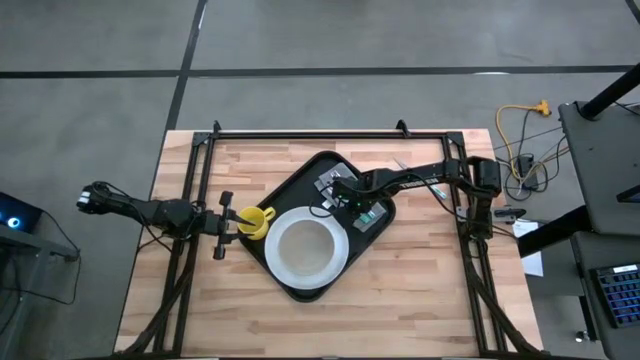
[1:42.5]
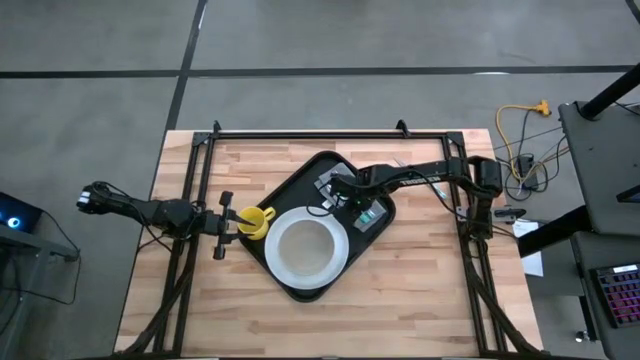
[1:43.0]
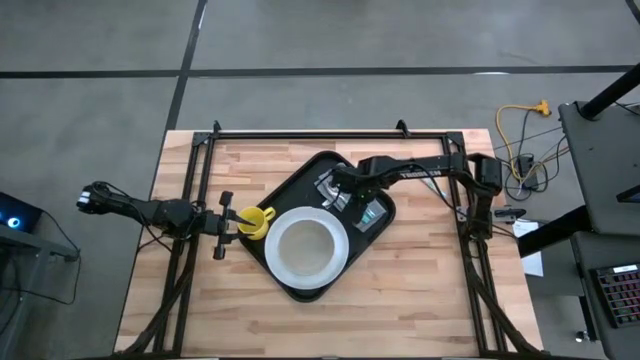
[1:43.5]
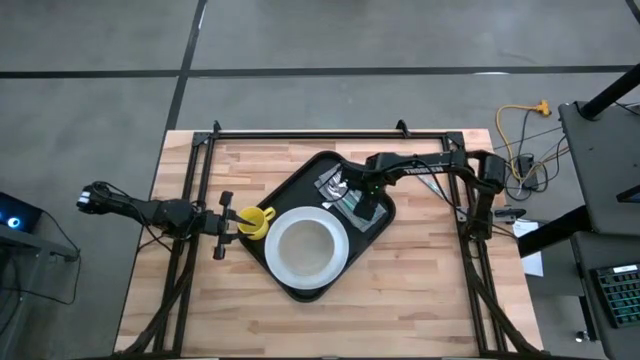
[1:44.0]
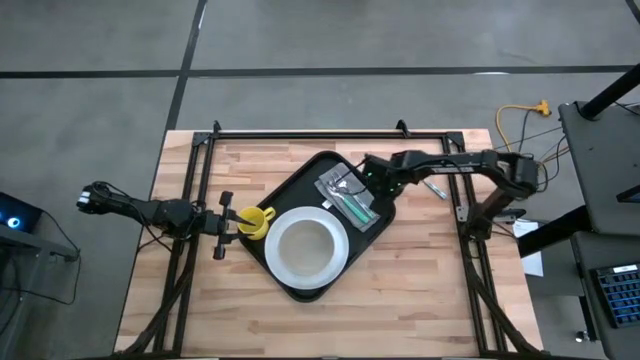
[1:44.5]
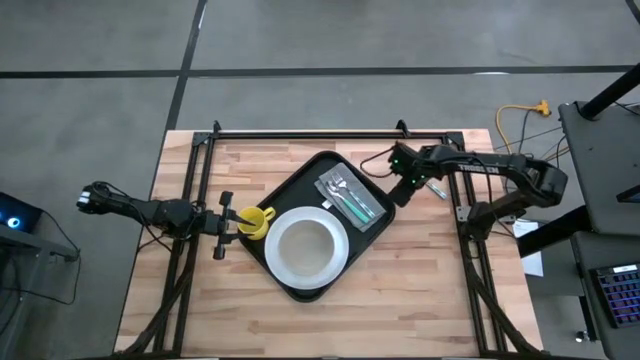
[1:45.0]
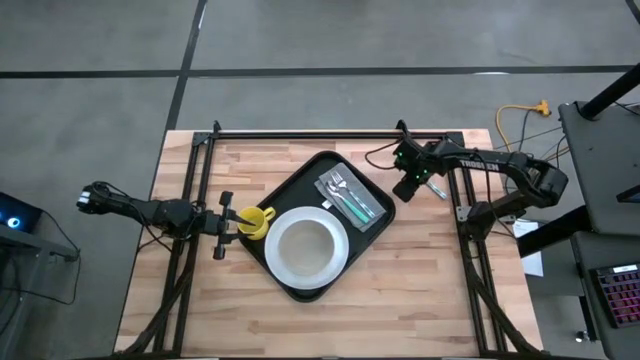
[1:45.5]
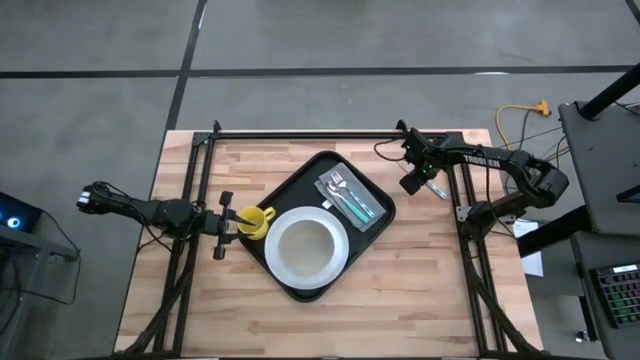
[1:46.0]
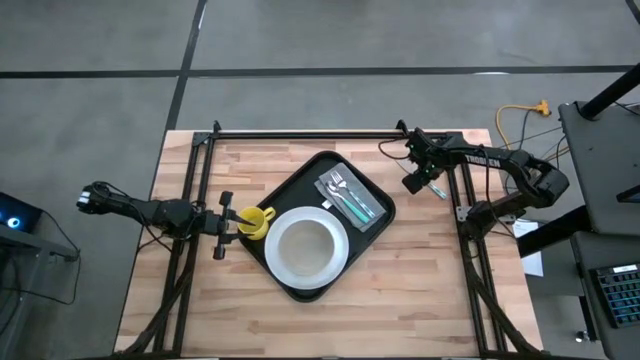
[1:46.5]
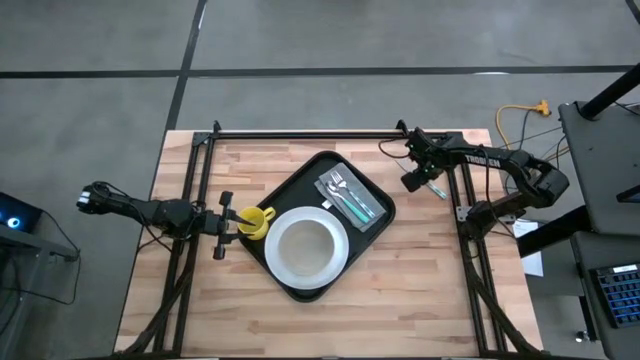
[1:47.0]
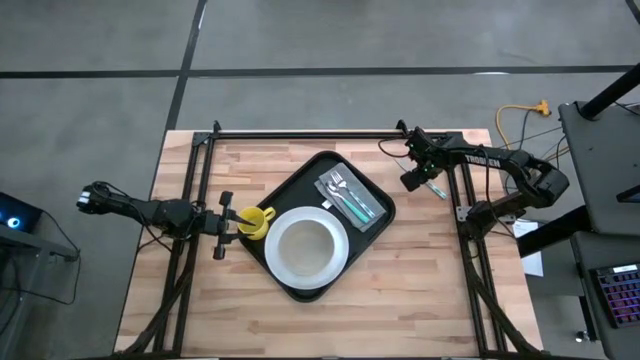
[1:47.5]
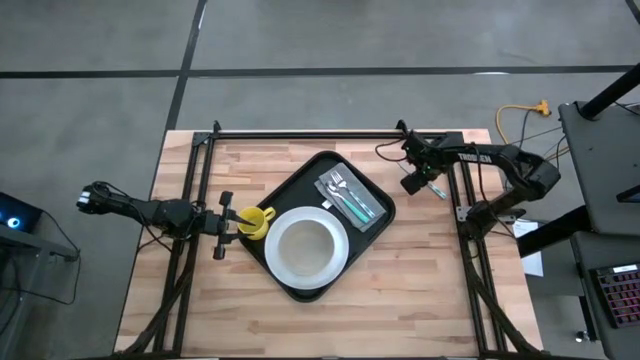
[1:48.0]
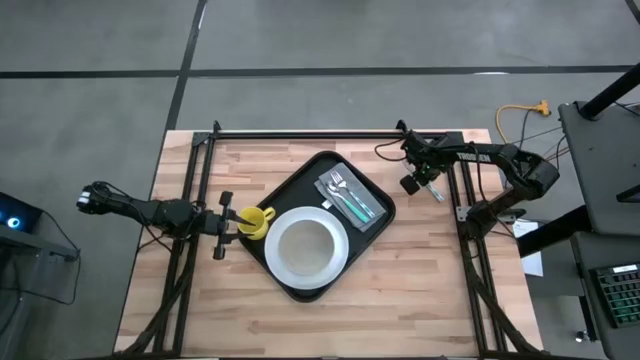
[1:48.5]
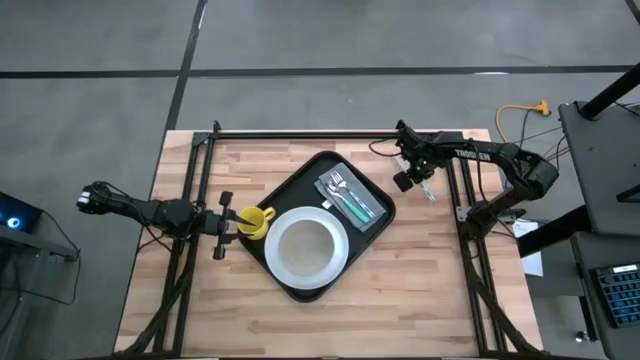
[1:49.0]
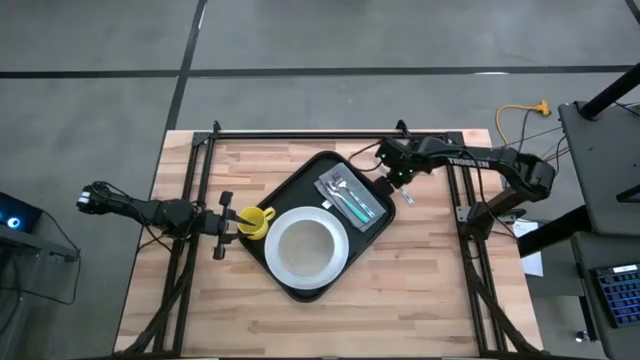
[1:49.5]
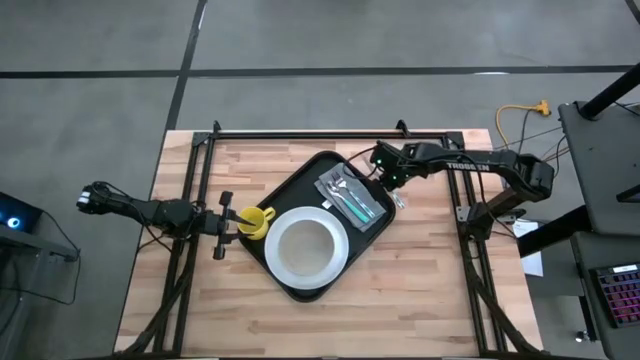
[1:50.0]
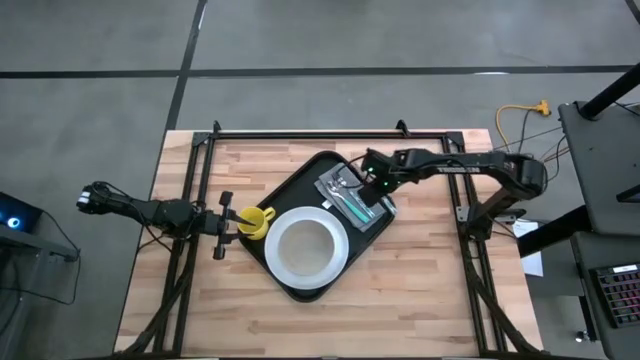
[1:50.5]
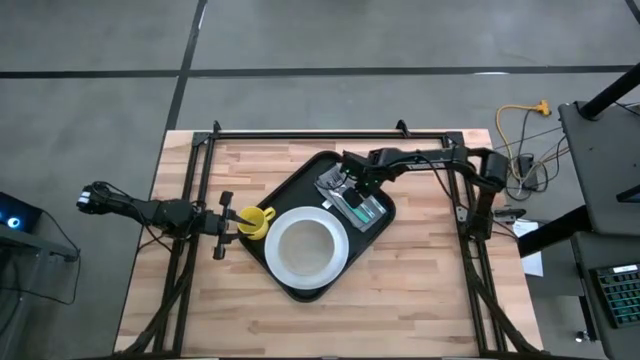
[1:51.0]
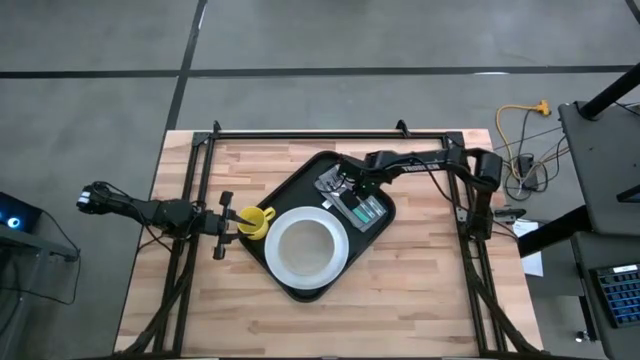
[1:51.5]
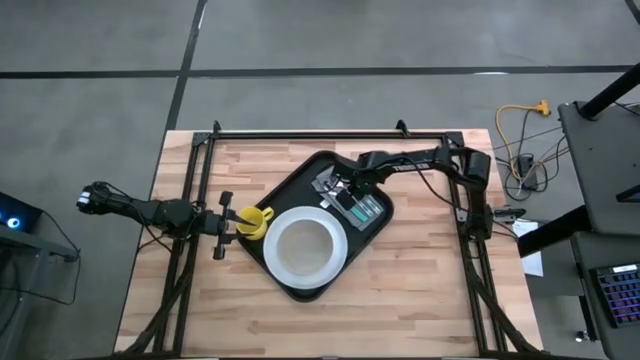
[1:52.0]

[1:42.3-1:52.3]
Task: Set up tray
Put the table knife to the right of the white fork on top of the gray napkin on the black serving tray
